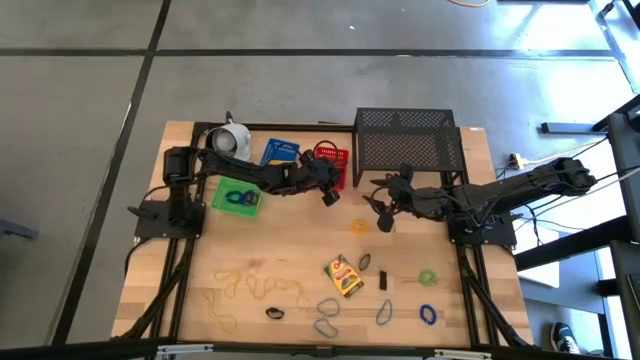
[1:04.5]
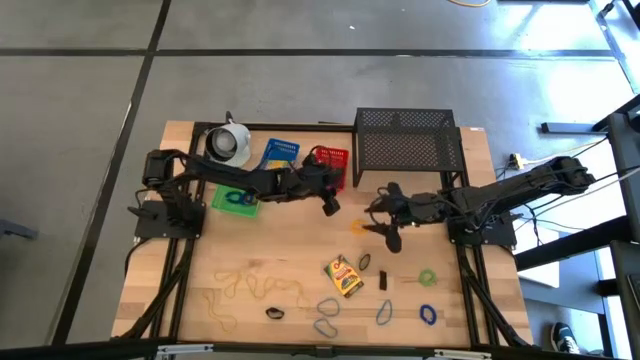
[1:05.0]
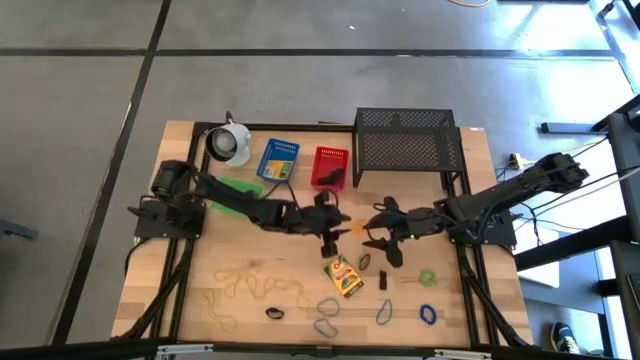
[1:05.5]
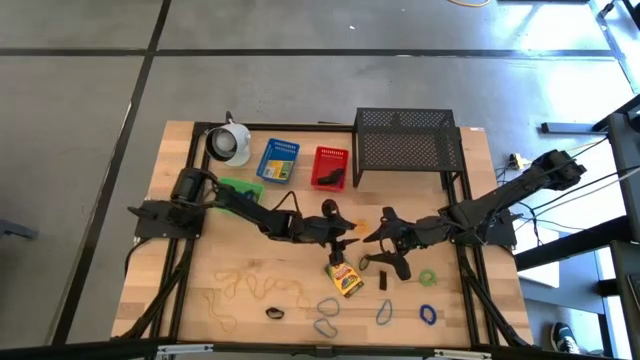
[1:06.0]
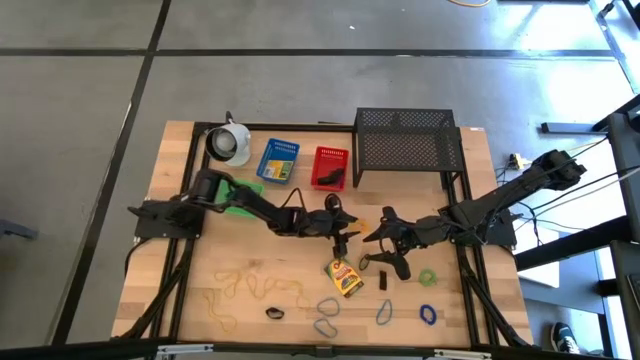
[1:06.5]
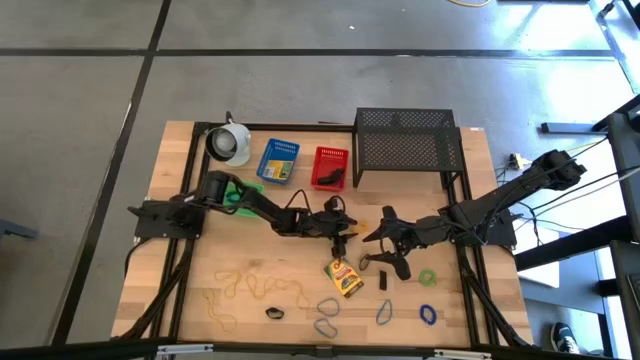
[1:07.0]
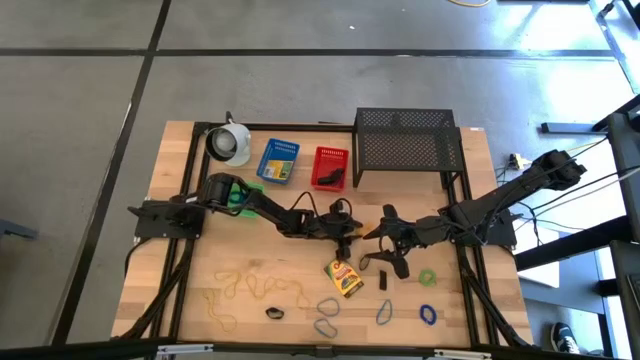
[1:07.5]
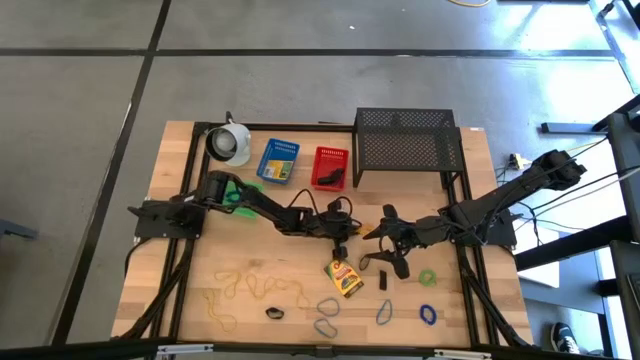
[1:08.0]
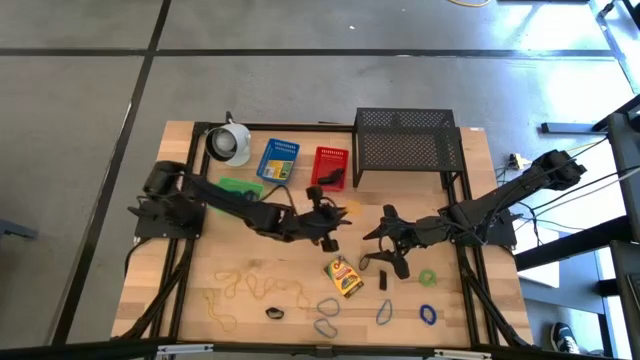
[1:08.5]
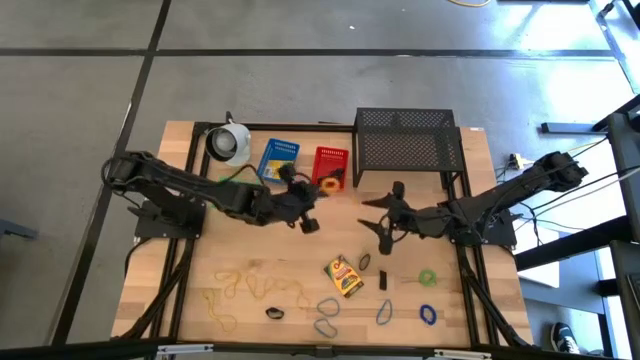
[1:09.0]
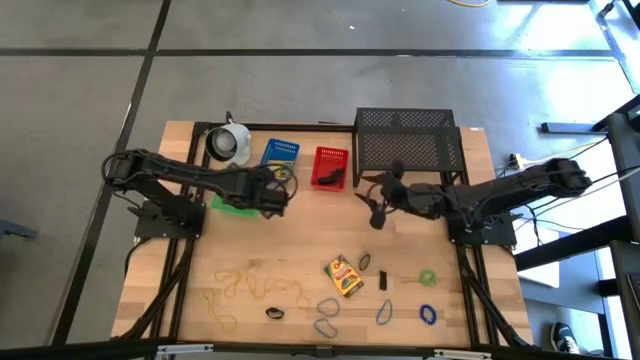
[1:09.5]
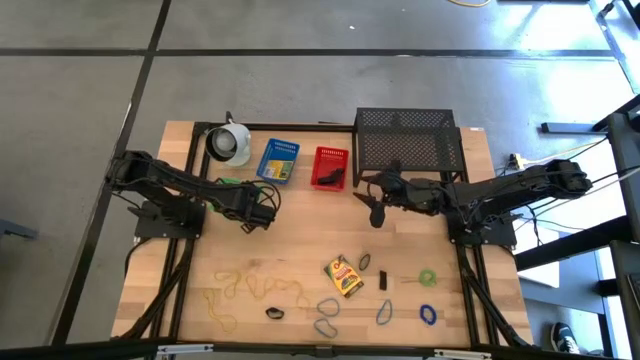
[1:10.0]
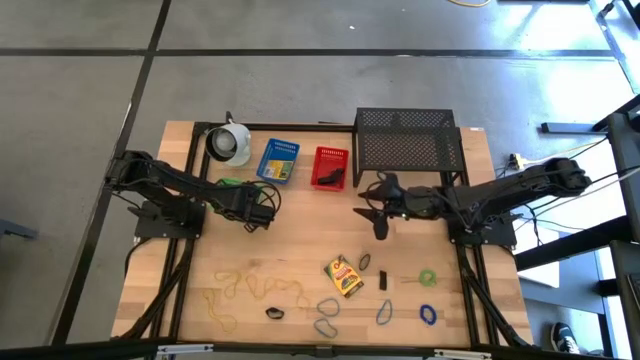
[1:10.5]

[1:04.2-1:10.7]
Task: Pick & Place Office Desk Supplies
Put the yellow spring keychain into the green bin

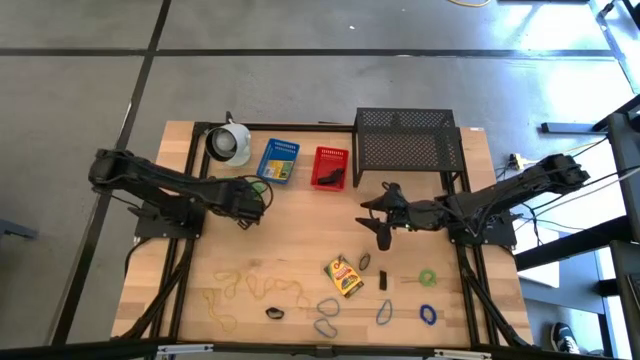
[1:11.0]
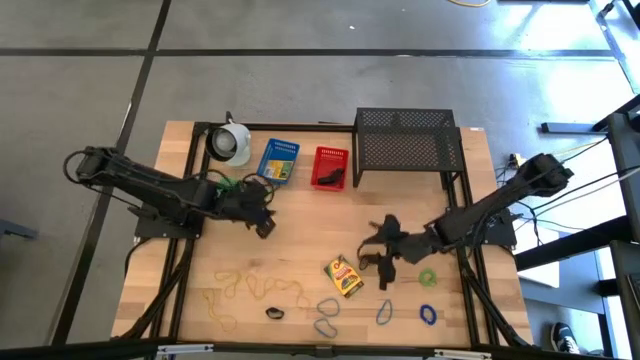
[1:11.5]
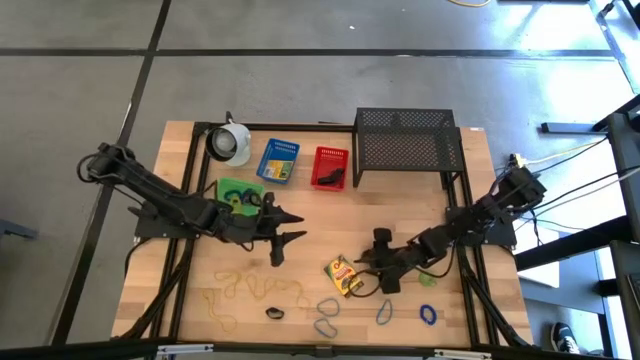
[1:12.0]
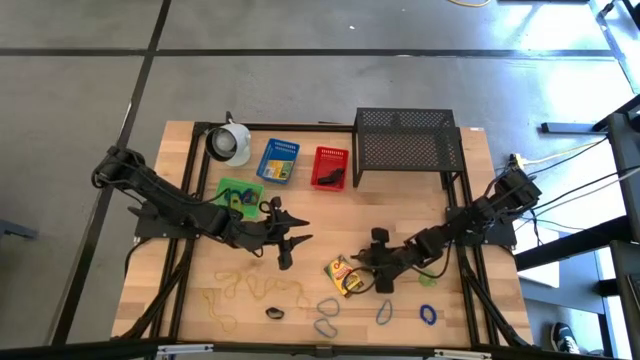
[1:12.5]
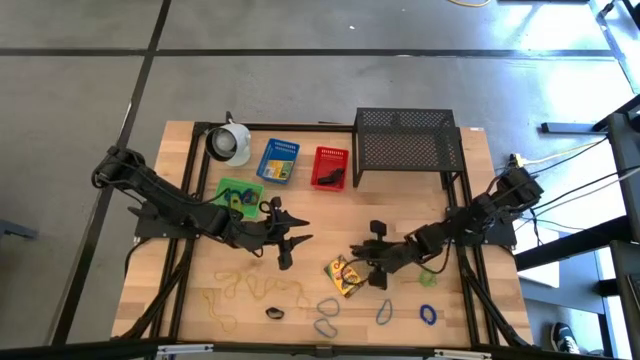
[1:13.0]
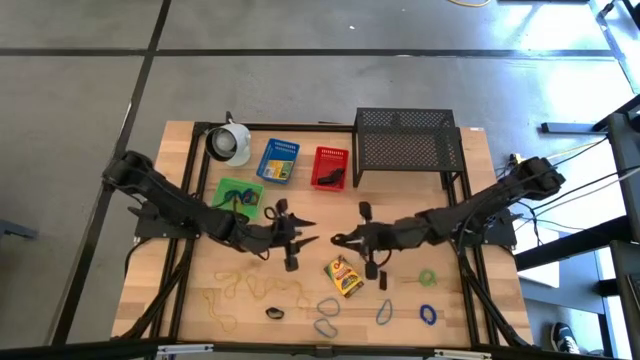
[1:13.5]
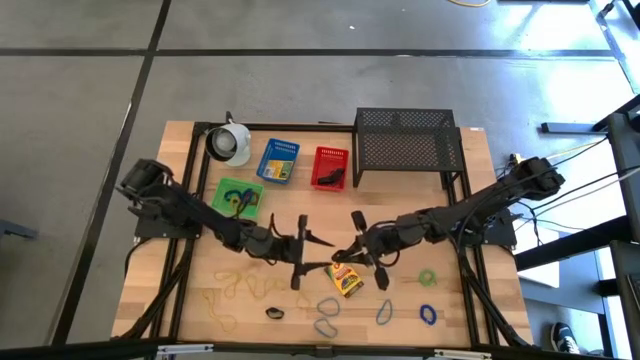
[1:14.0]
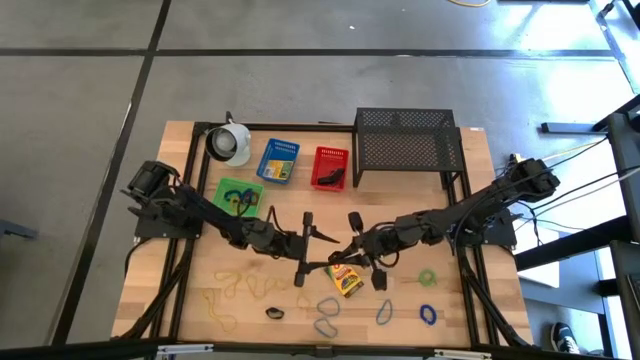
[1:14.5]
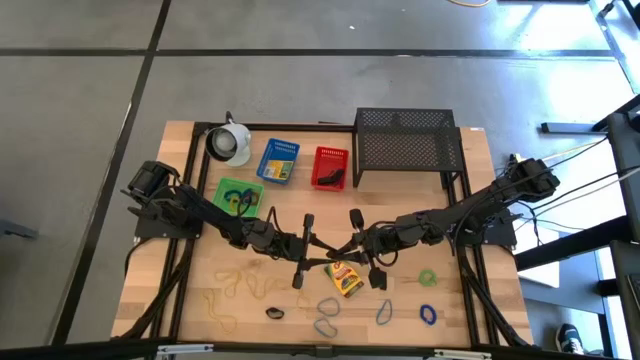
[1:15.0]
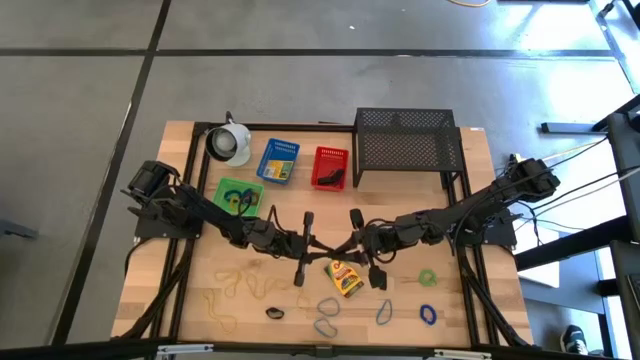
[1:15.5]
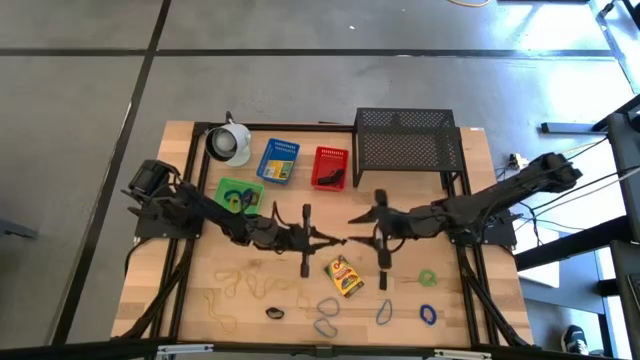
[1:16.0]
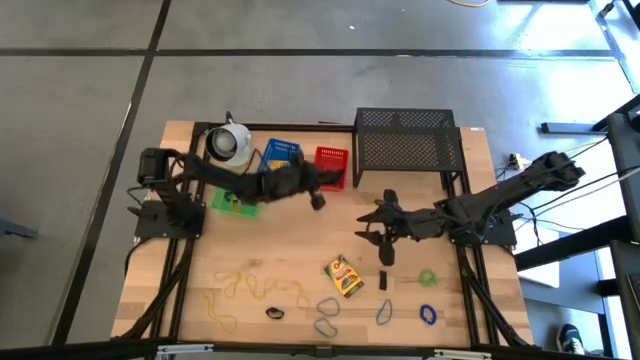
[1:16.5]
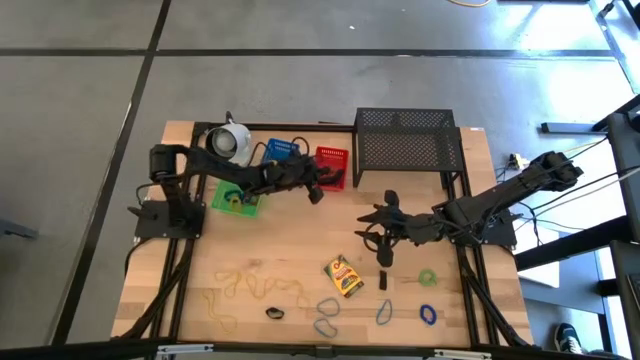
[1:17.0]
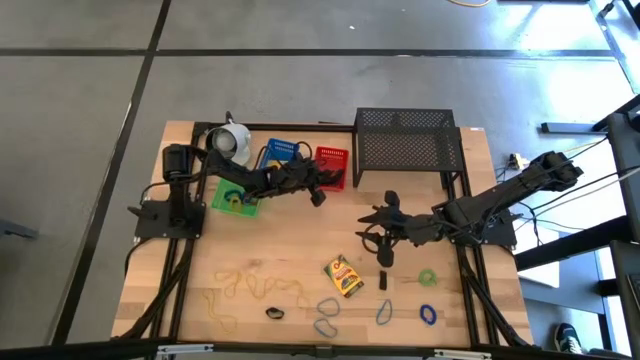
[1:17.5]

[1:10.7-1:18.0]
Put the black rubber band into the red bin

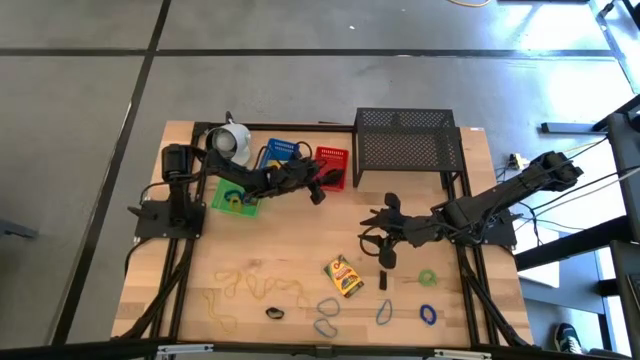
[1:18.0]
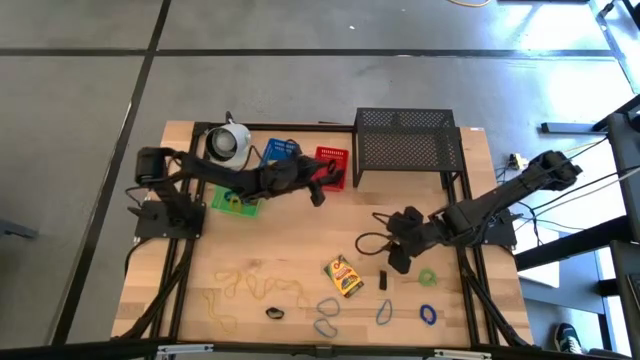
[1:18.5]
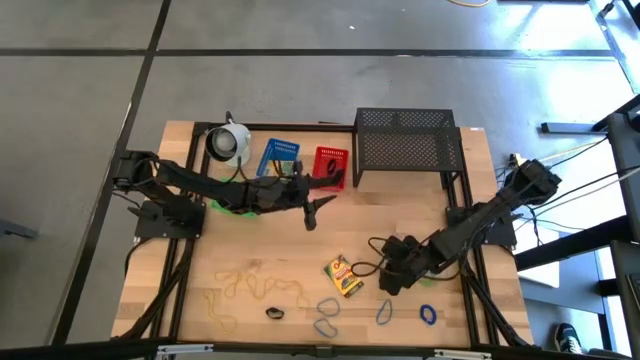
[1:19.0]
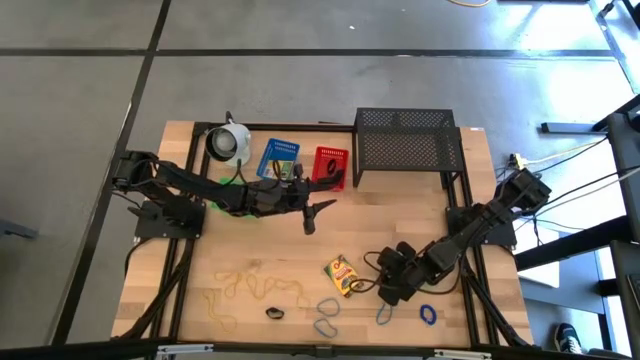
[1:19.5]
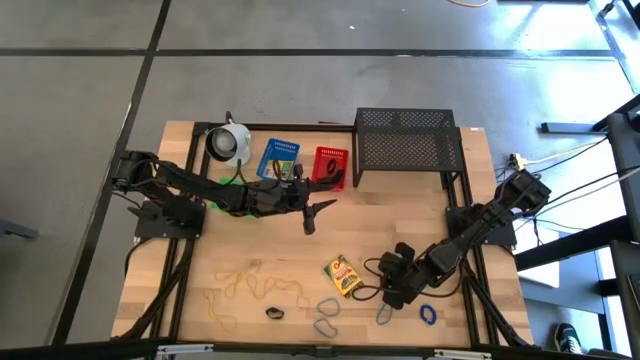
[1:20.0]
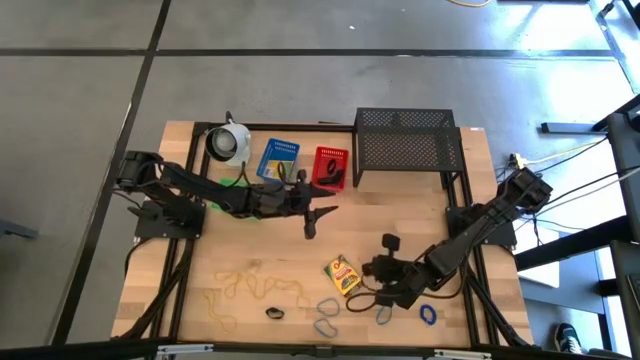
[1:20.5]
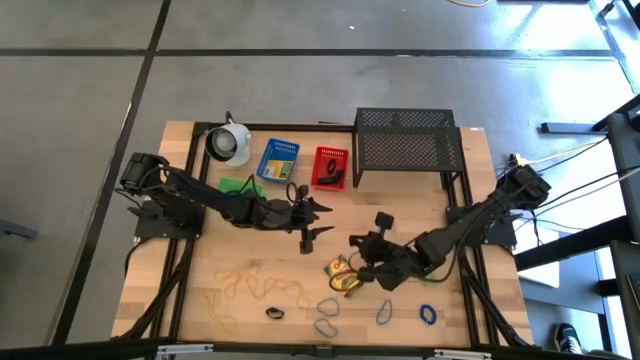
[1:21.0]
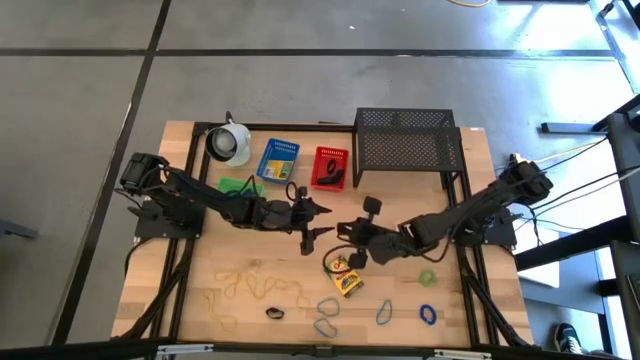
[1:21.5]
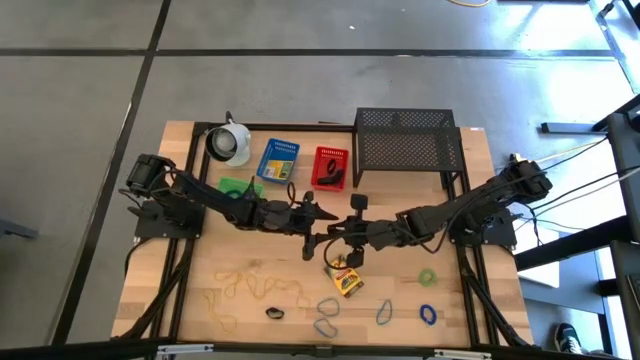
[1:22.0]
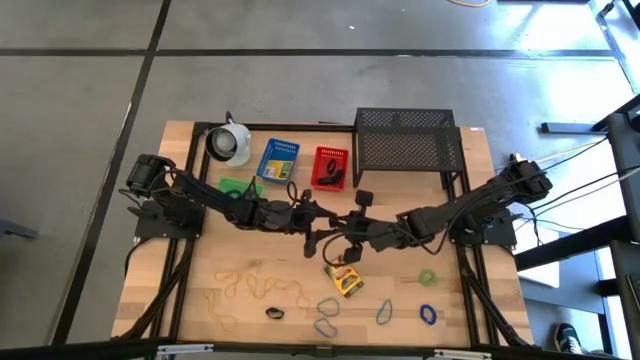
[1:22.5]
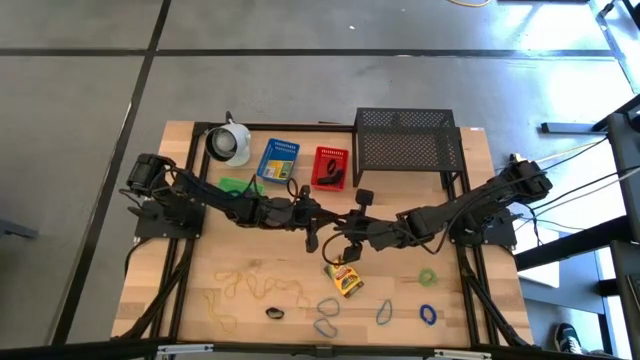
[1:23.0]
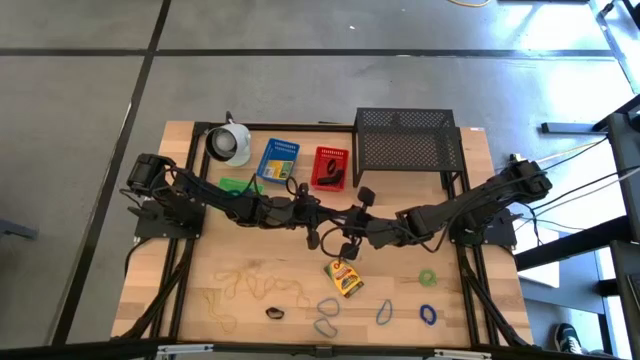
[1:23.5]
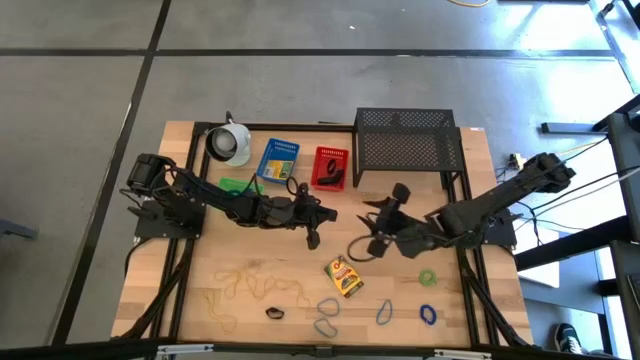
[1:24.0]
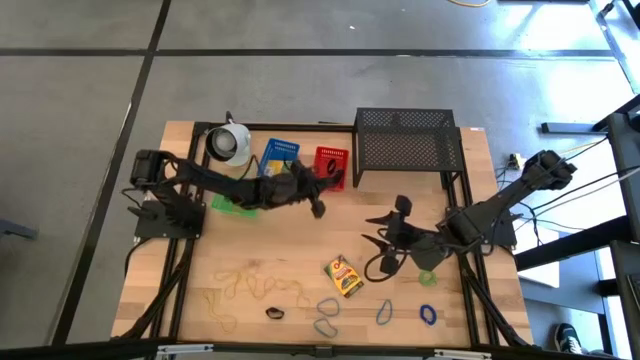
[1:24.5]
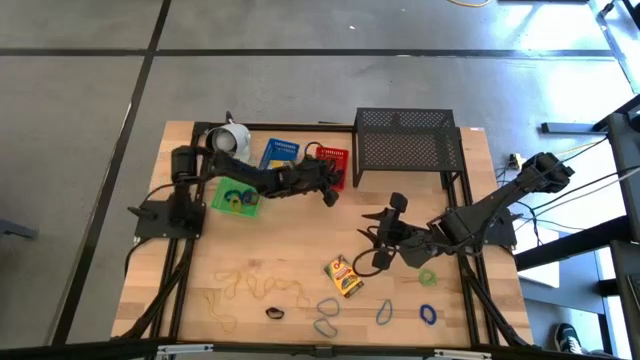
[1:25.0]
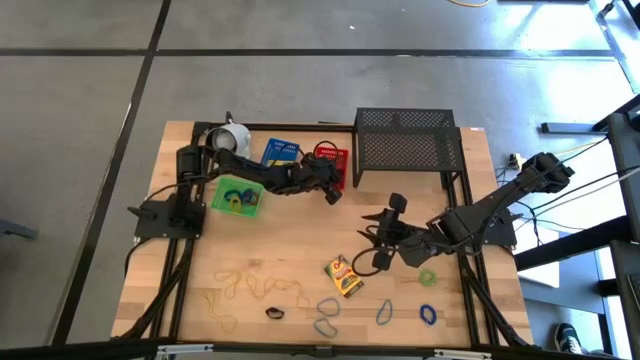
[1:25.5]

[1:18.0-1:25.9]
Put the black rubber band into the red bin
